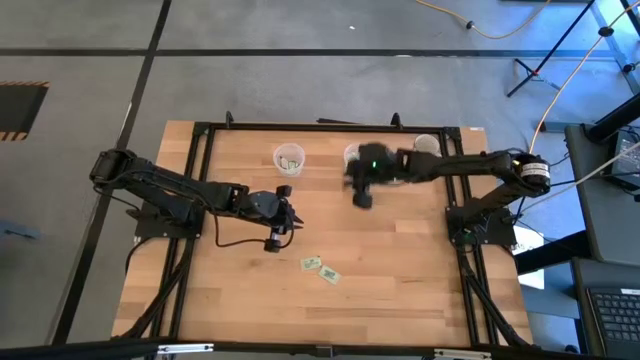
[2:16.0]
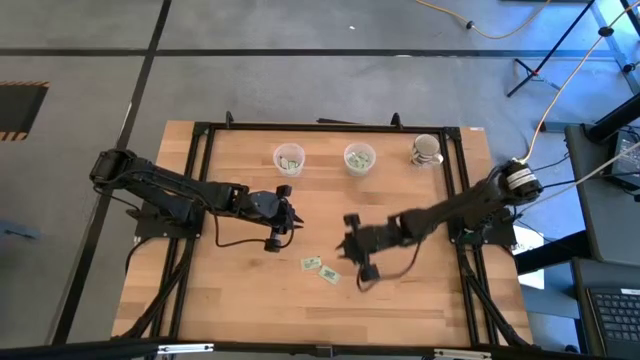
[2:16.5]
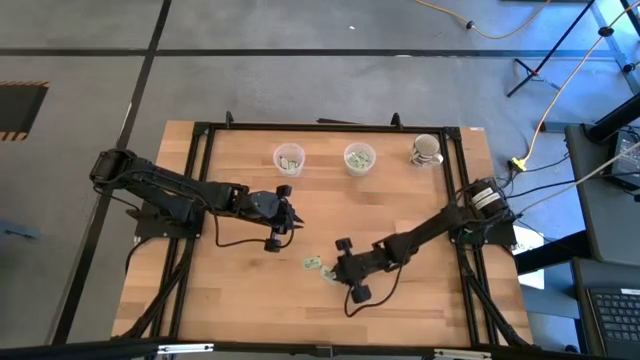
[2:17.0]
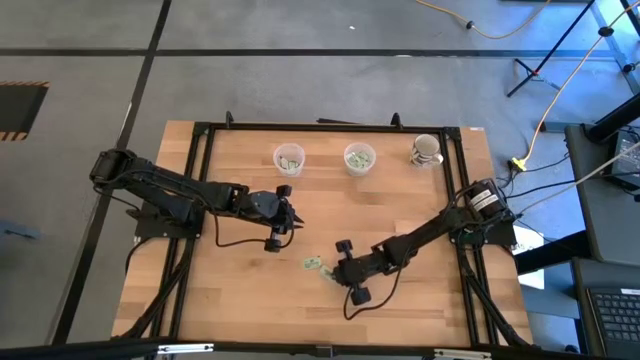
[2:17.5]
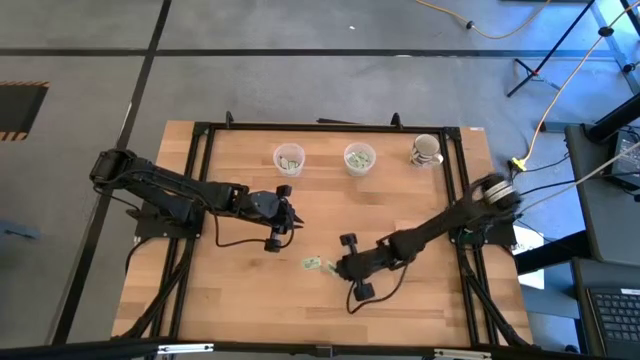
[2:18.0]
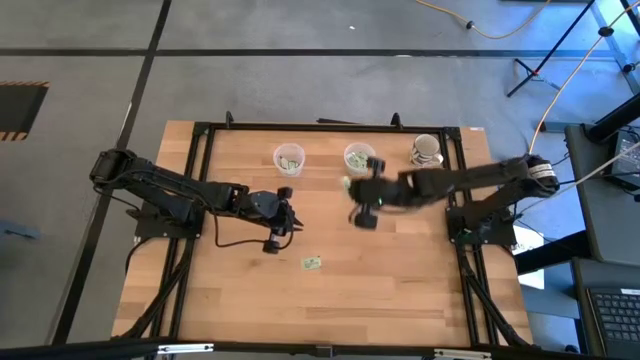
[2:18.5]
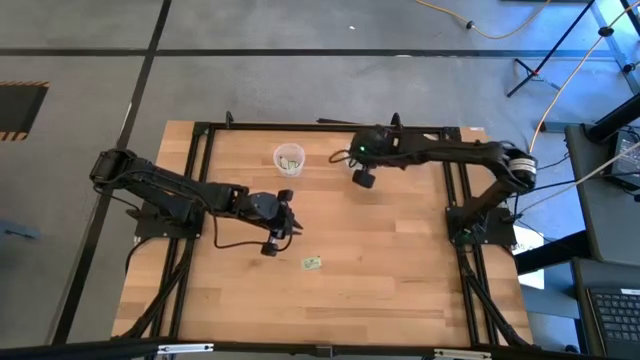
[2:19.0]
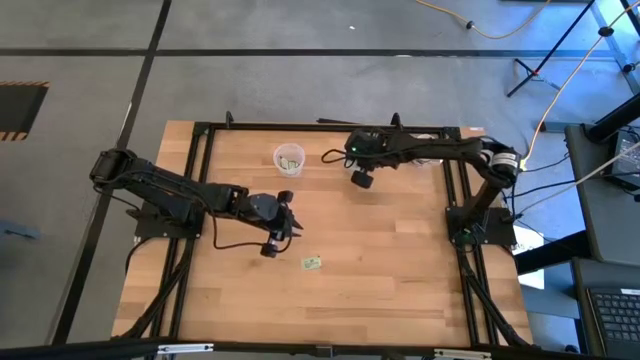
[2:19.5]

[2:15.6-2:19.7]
Task: Pick and place Stevia / Truvia into bins
Put the stevia packet into the right transparent container

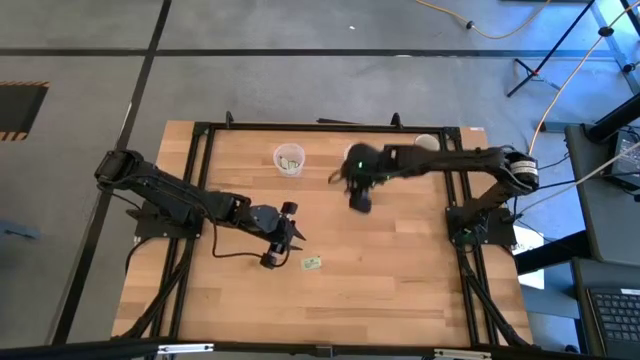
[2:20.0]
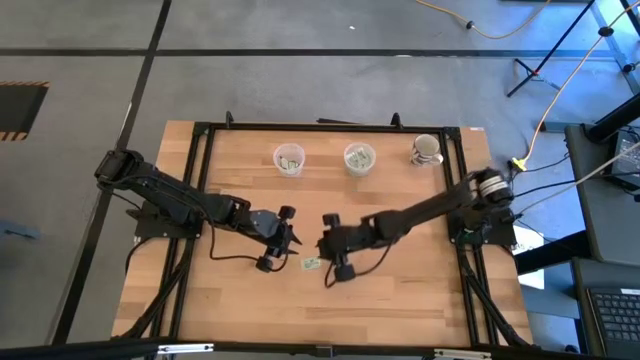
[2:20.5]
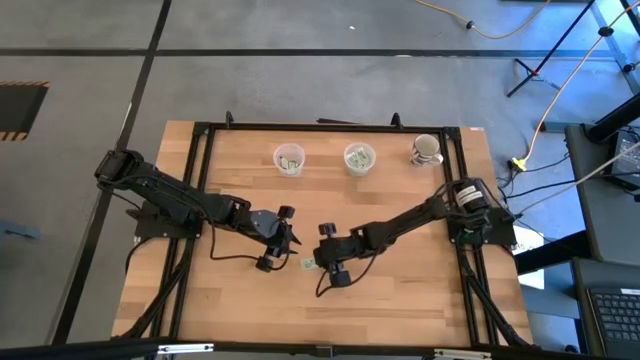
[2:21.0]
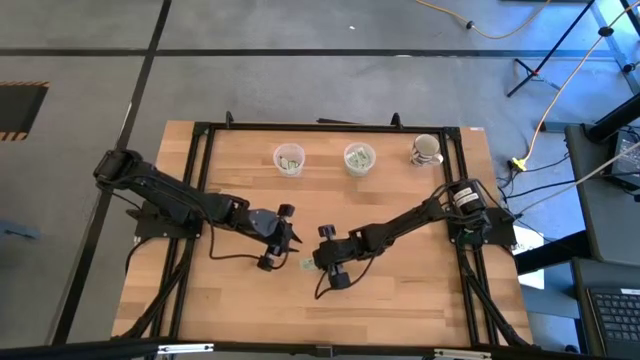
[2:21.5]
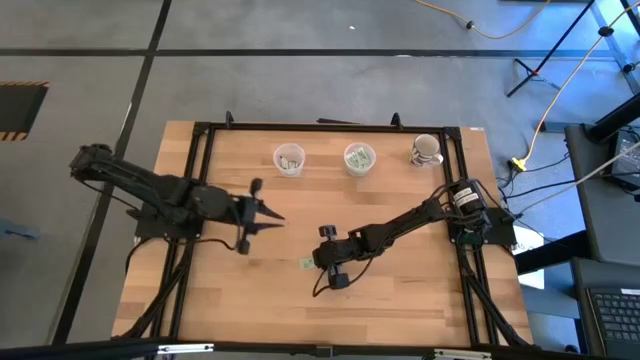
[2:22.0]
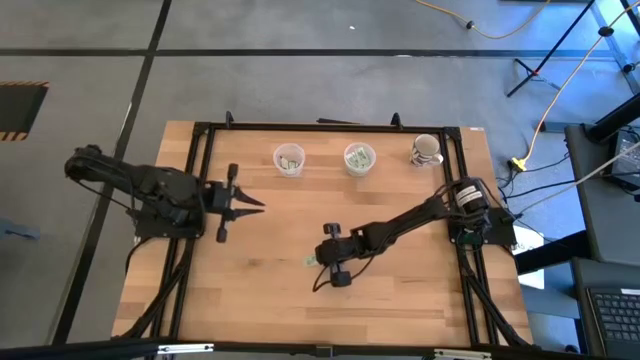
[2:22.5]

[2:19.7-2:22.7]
Put the stevia packet into the right transparent container

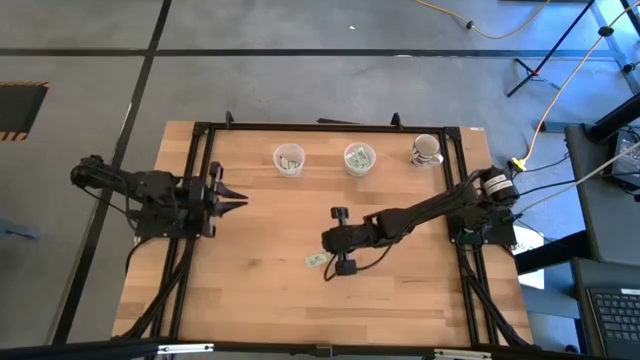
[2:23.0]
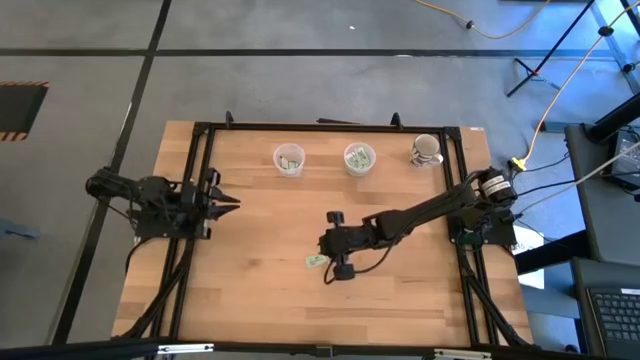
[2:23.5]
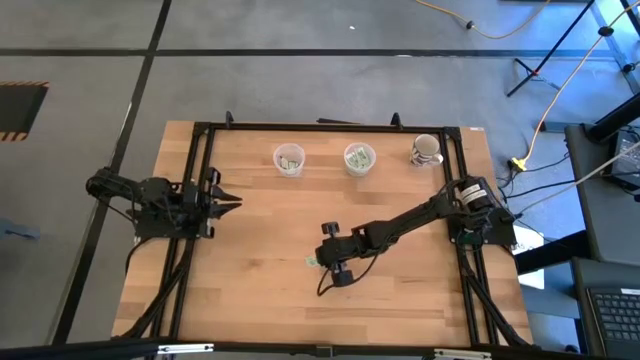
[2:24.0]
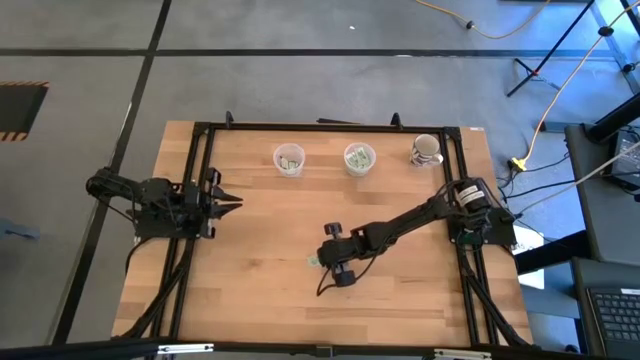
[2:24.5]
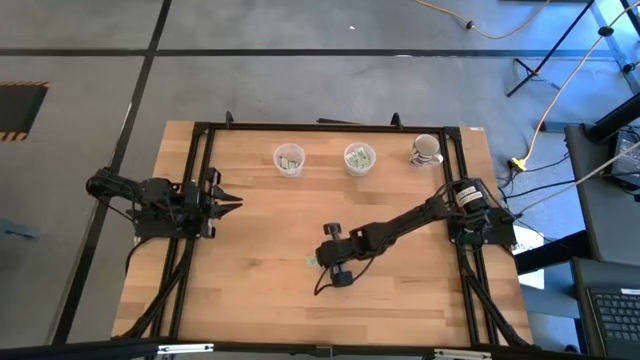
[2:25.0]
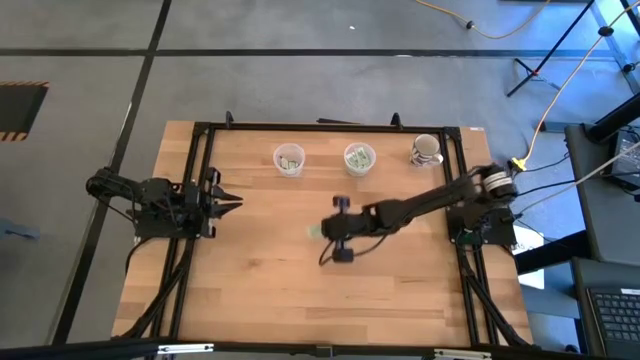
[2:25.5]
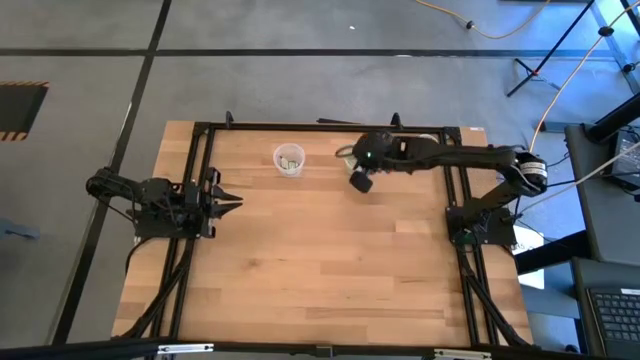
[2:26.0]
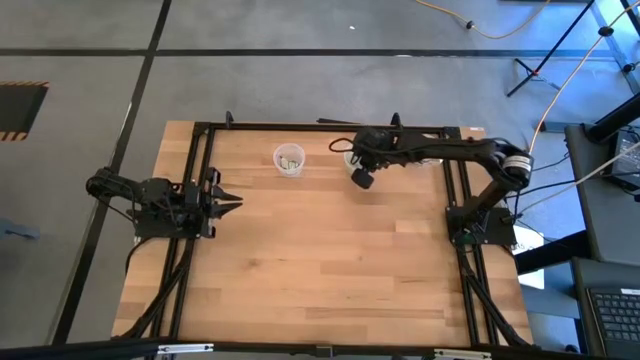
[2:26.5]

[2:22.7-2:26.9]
Put the stevia packet into the right transparent container

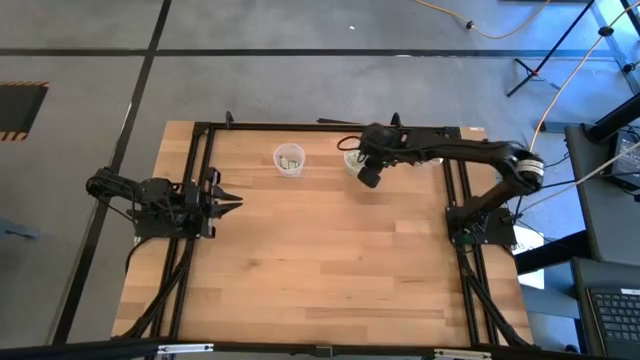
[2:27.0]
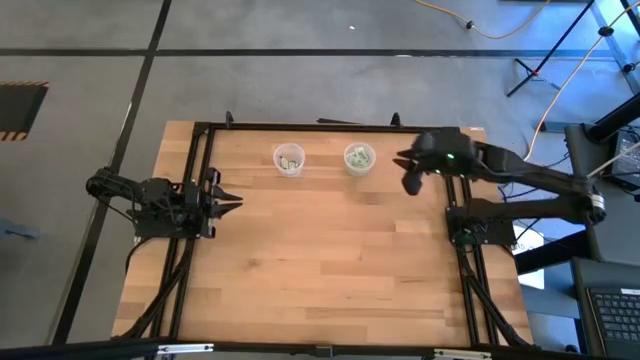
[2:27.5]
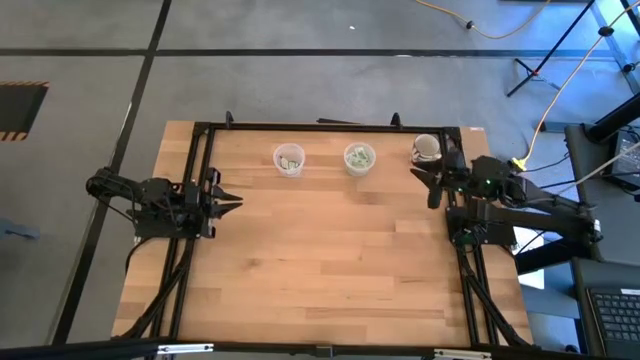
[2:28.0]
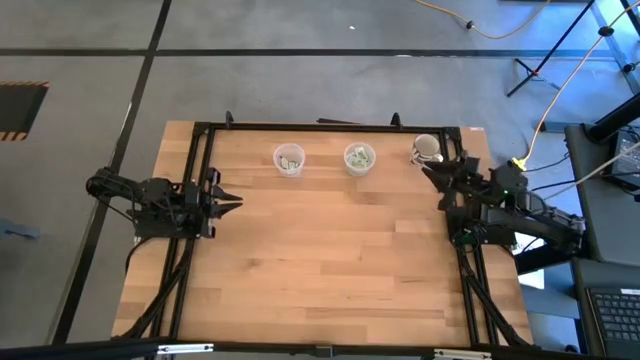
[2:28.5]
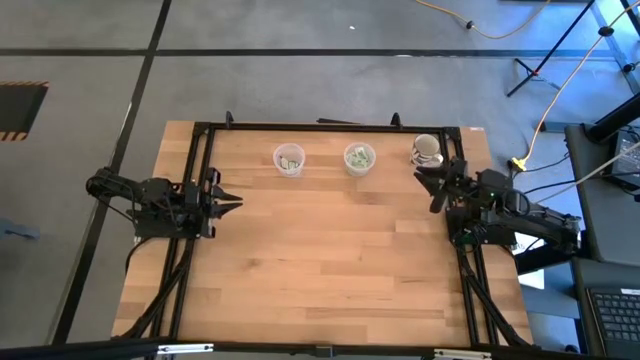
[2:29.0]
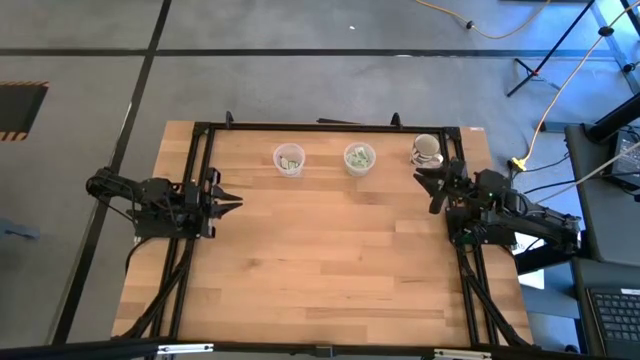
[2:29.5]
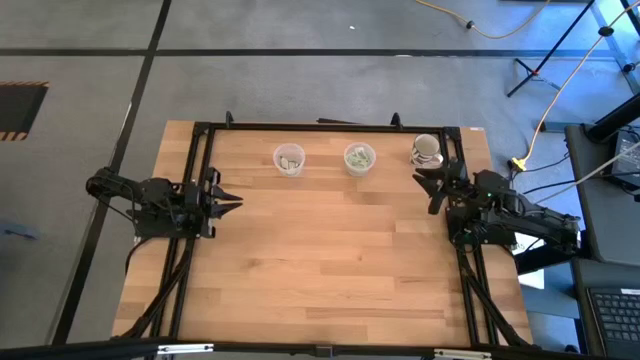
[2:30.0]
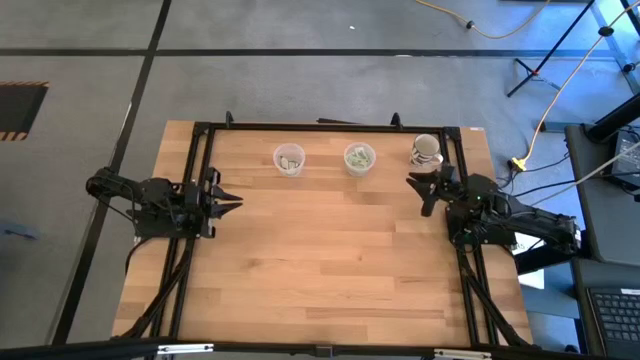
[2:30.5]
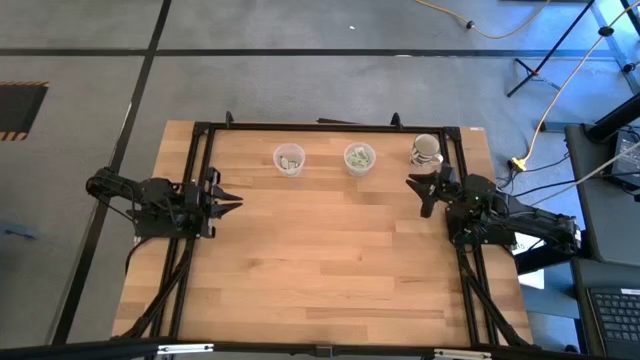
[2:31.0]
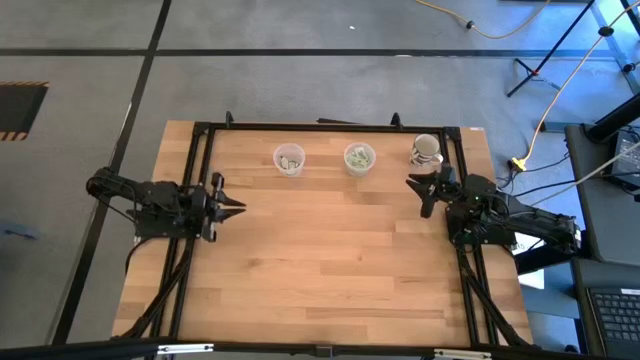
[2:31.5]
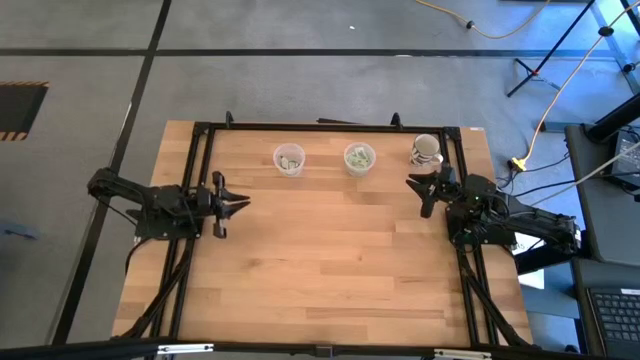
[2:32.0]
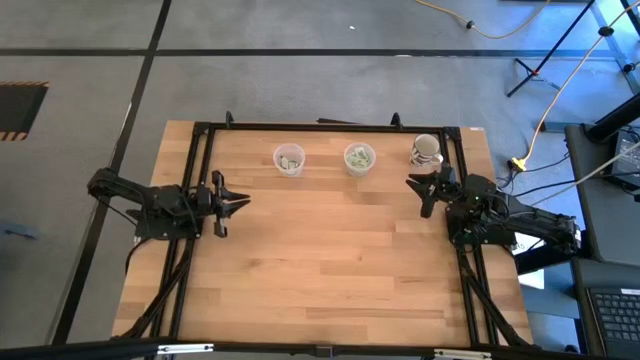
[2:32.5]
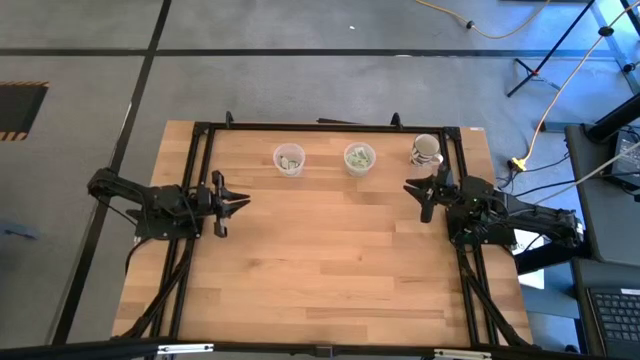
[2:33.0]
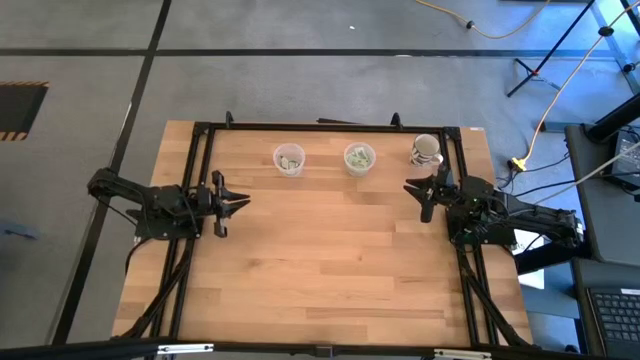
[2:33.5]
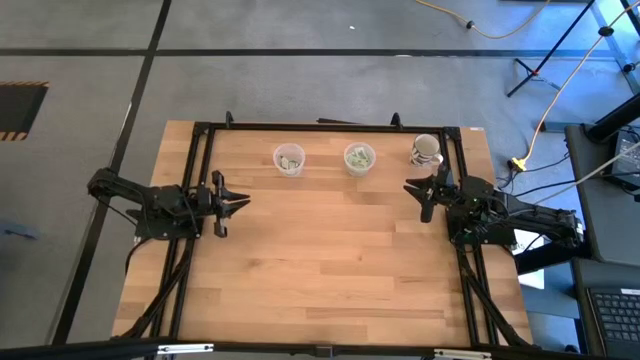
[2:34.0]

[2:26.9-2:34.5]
Return to Home Position

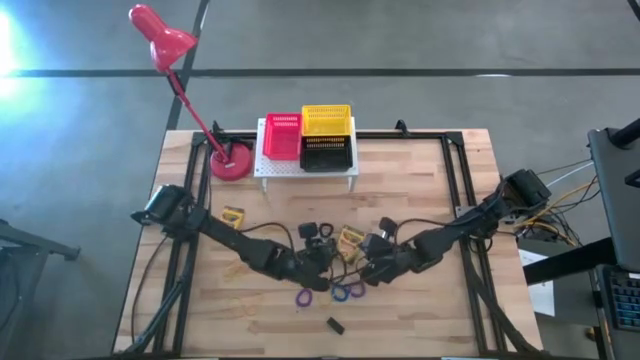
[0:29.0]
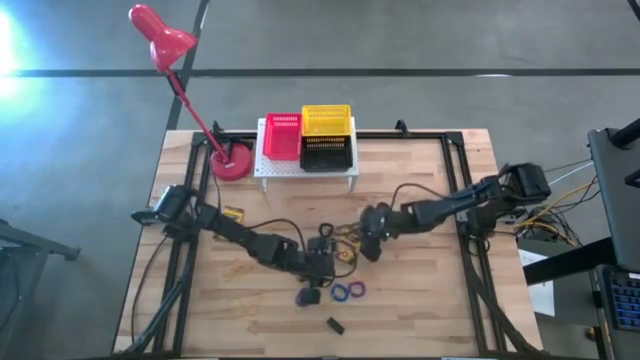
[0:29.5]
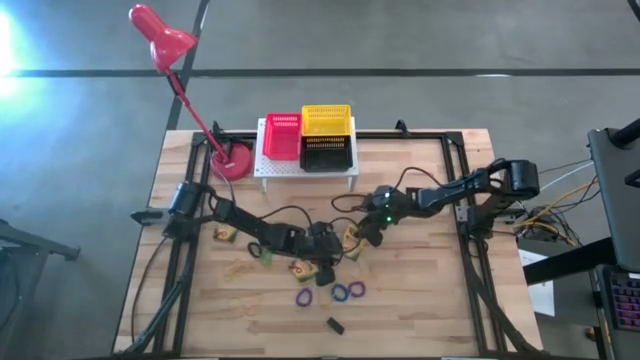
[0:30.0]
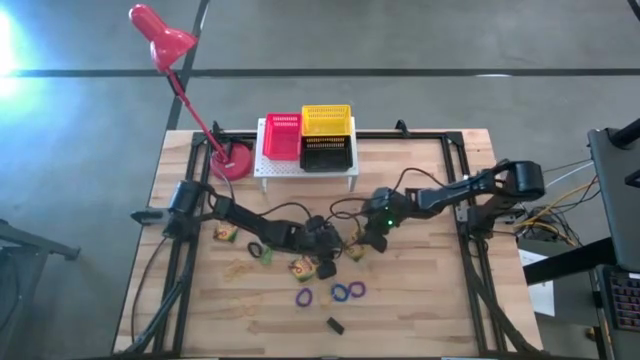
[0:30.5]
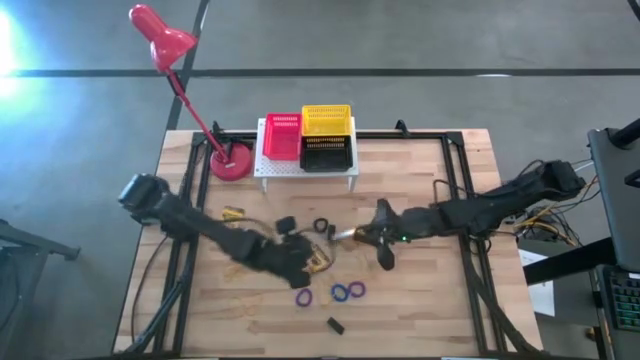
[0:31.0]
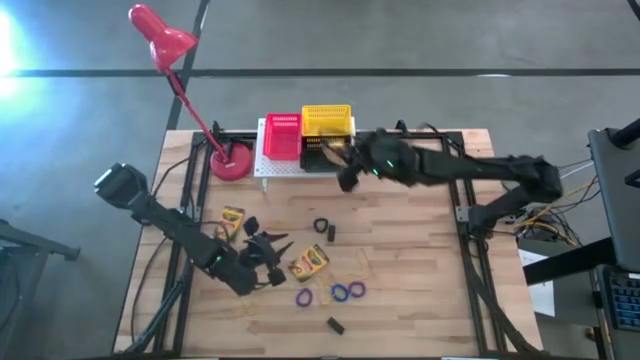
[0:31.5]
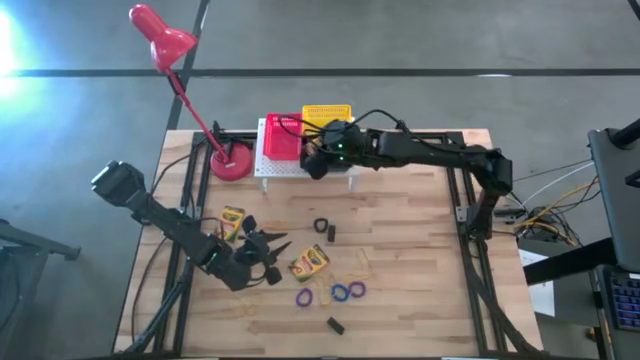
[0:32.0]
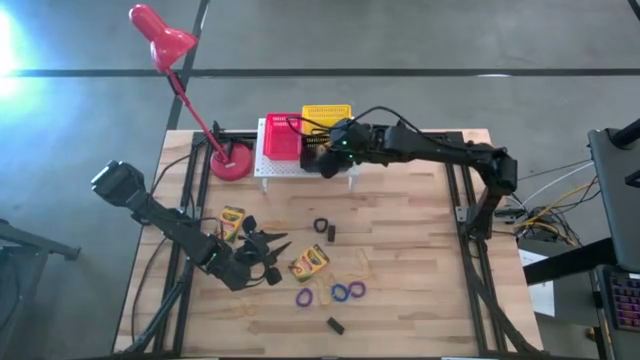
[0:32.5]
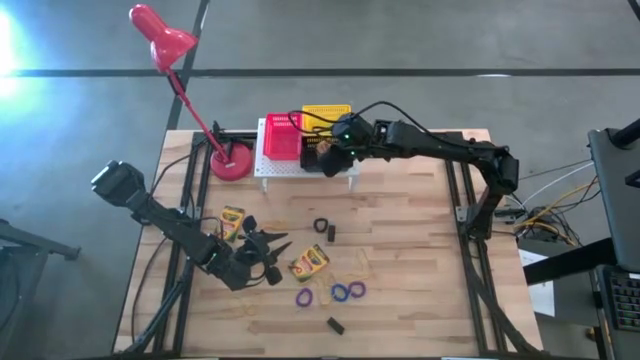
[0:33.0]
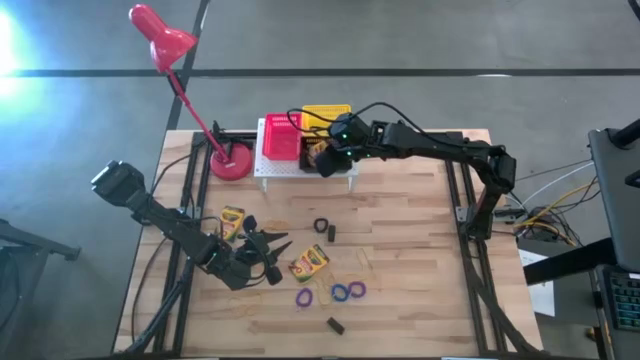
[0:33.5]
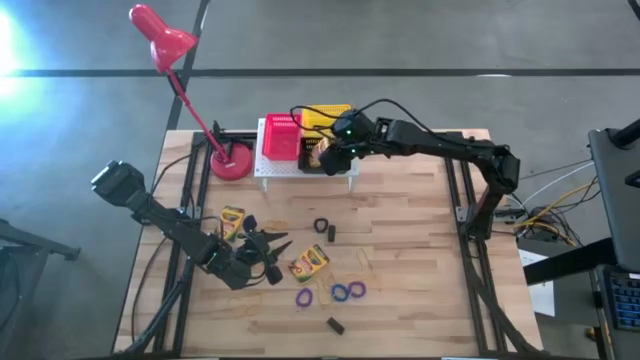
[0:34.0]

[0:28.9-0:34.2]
Task: Pick & Place Office Desk Supplies
Put the right crayon box into the black bin on the shelf
